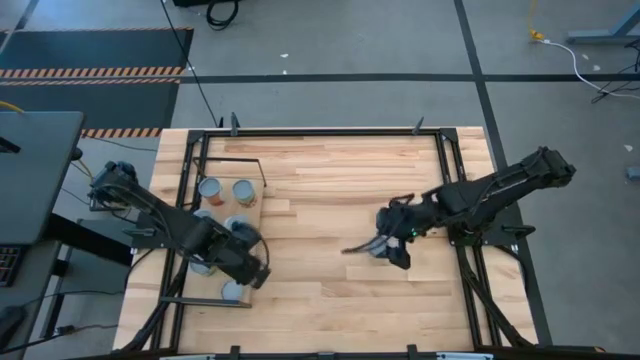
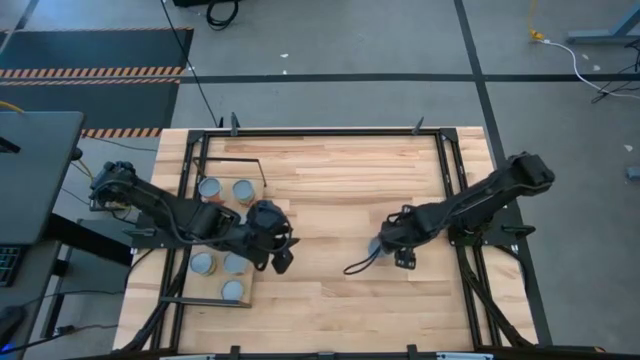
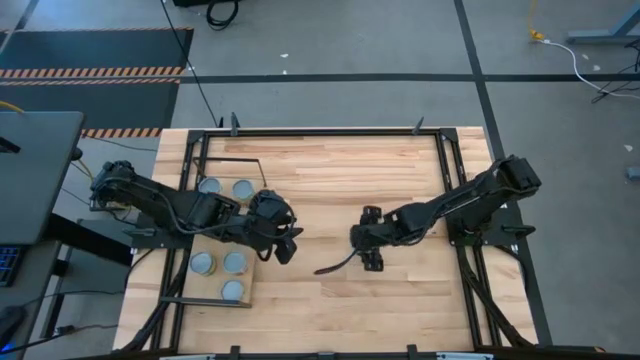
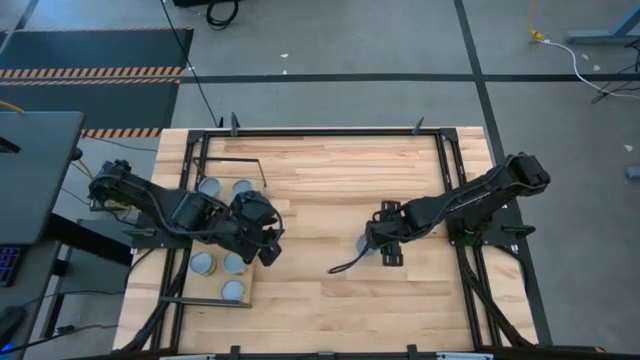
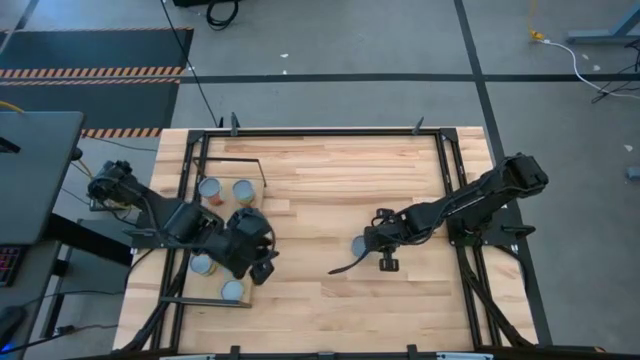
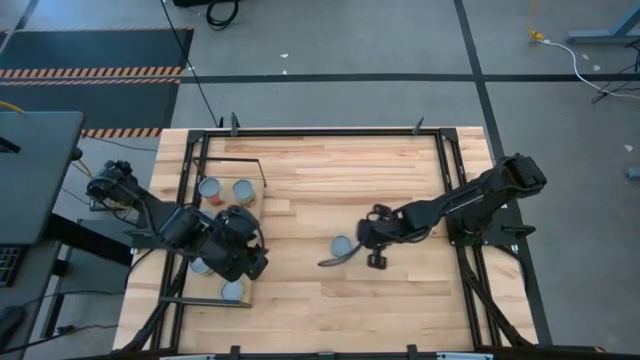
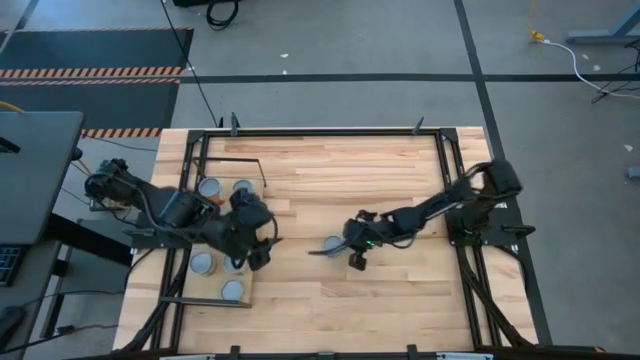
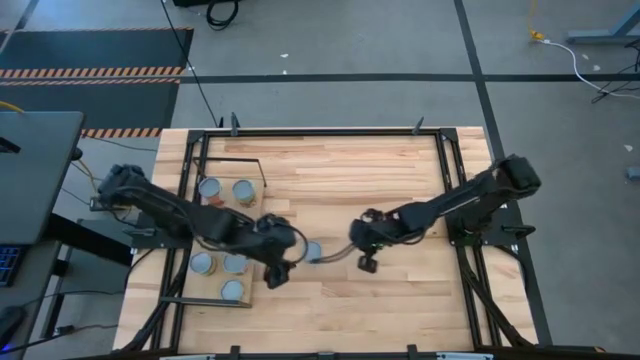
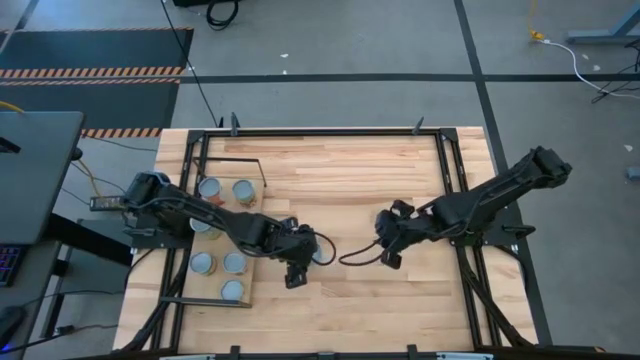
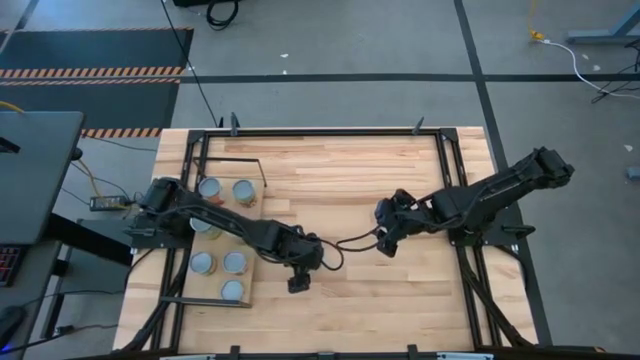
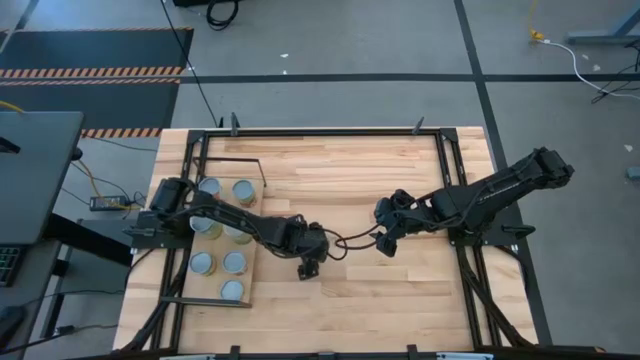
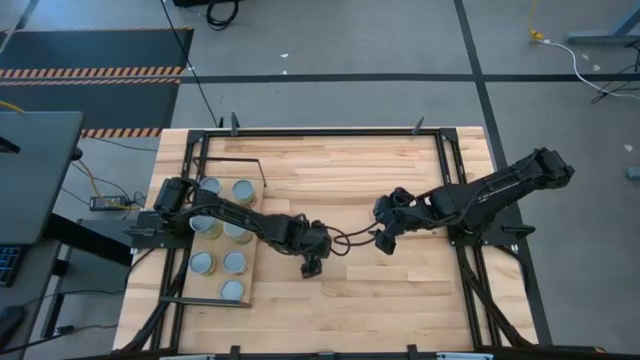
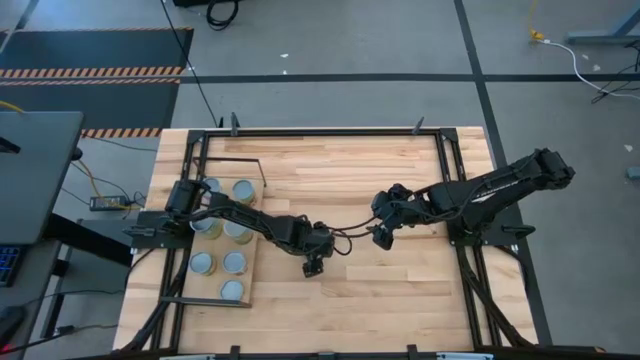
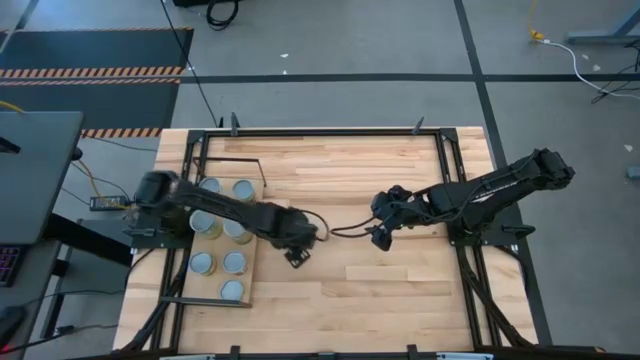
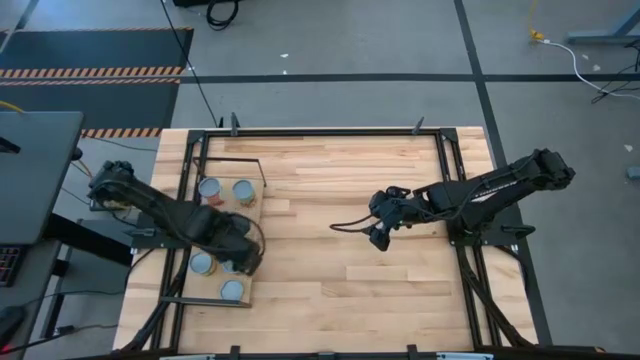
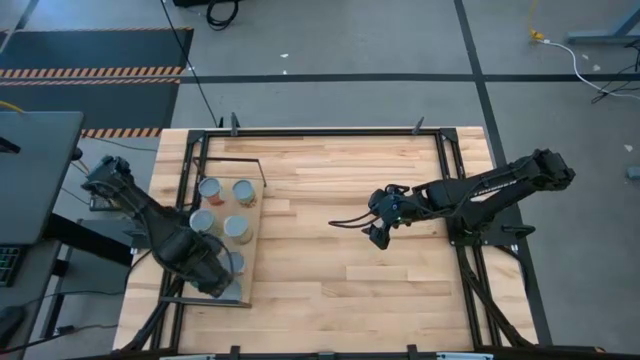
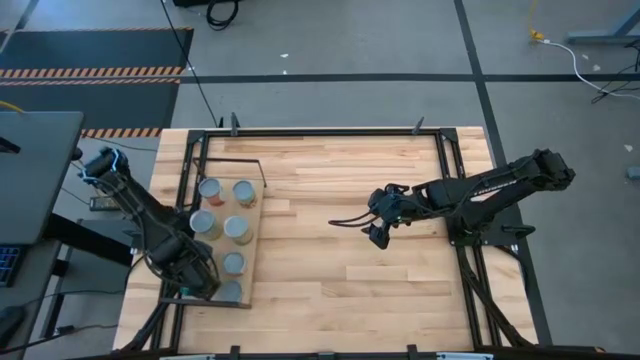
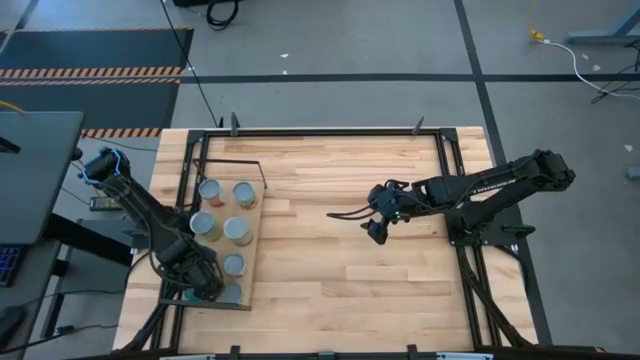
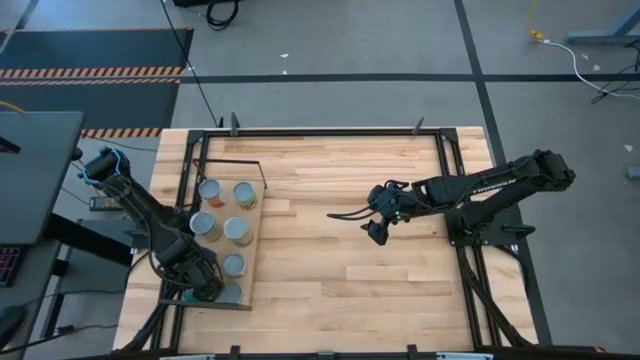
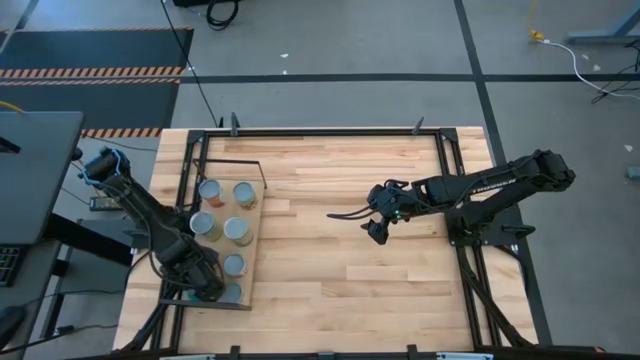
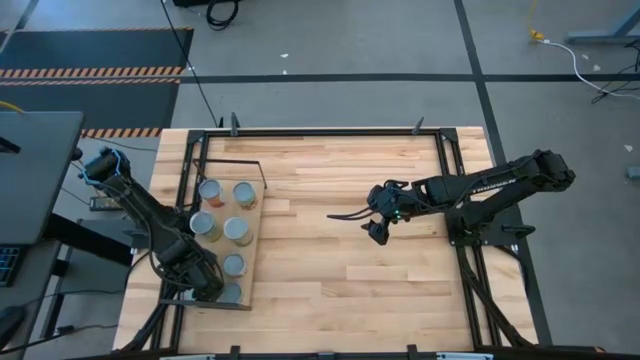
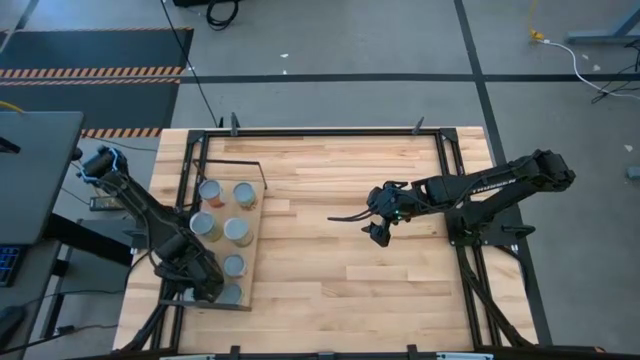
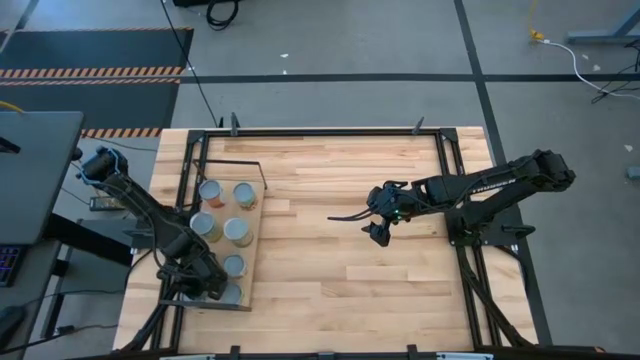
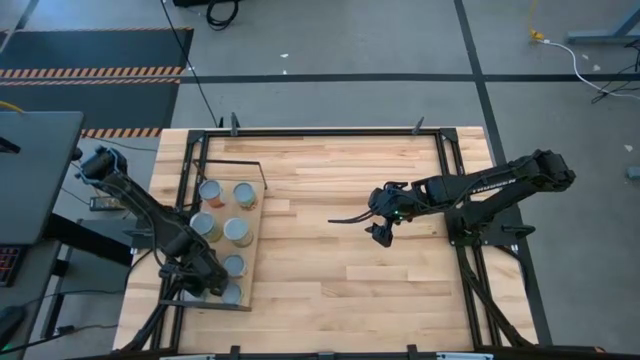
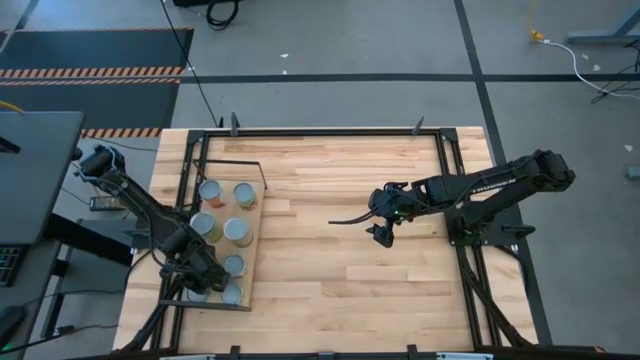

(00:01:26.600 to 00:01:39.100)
Task: Pick and place cans onto a shelf
Put the canned tuna on the shelf

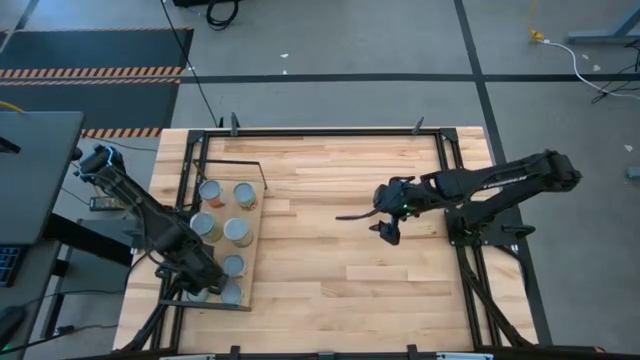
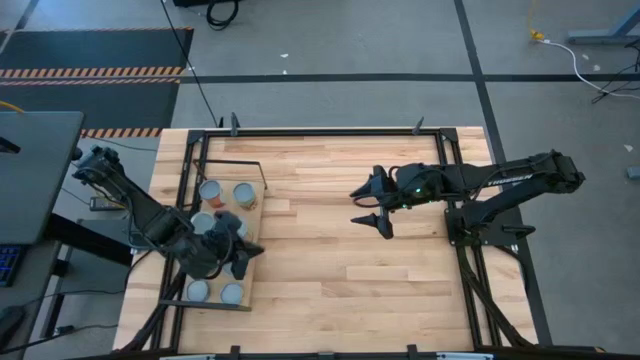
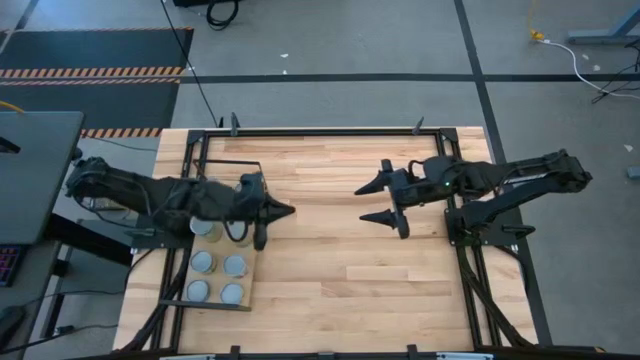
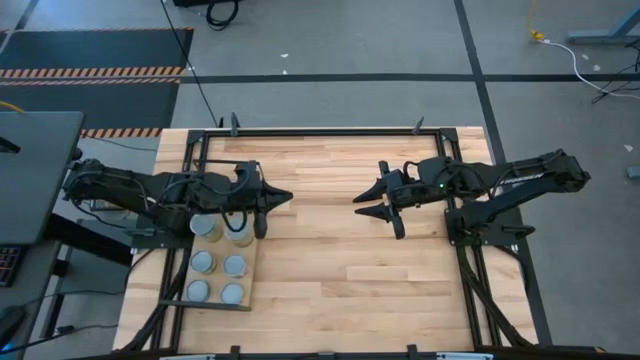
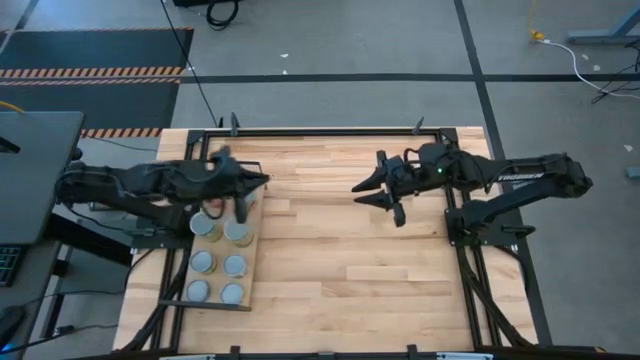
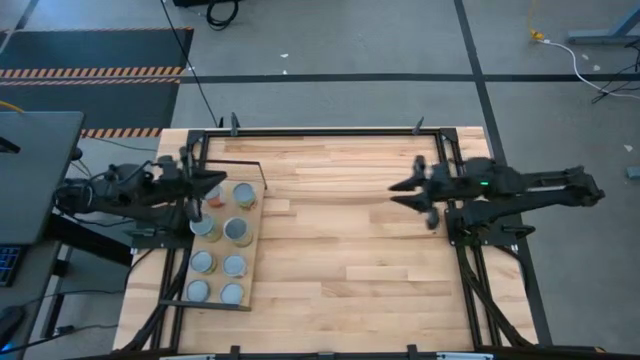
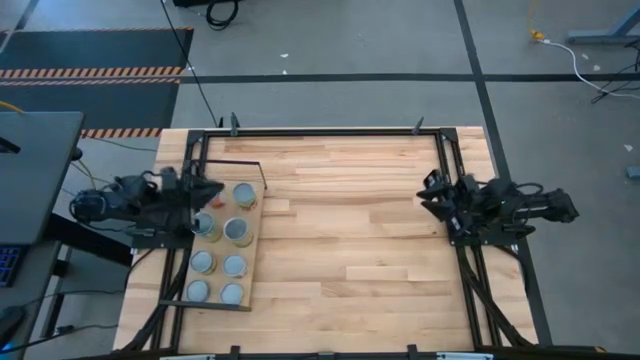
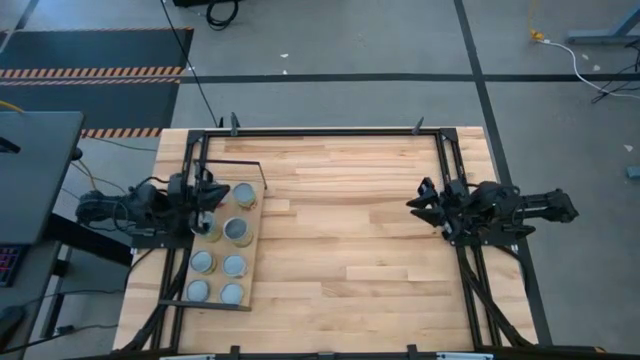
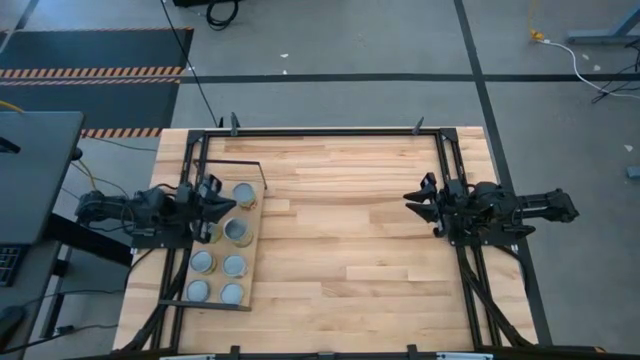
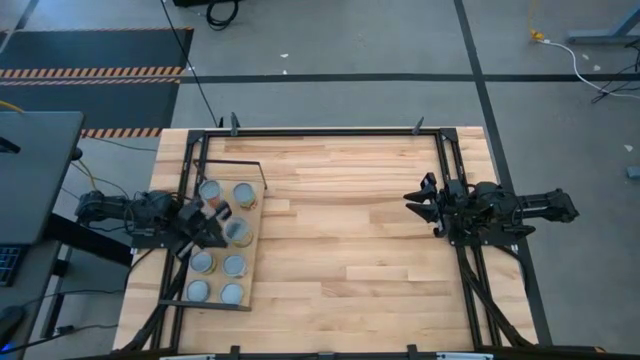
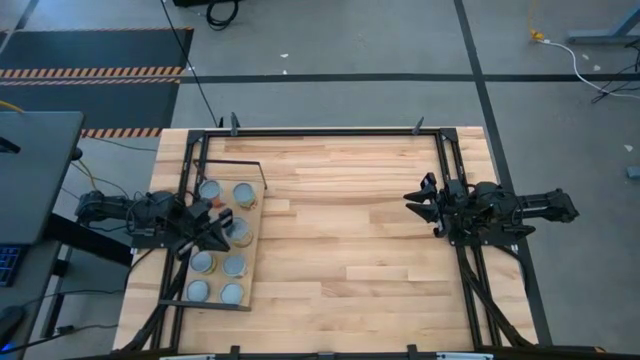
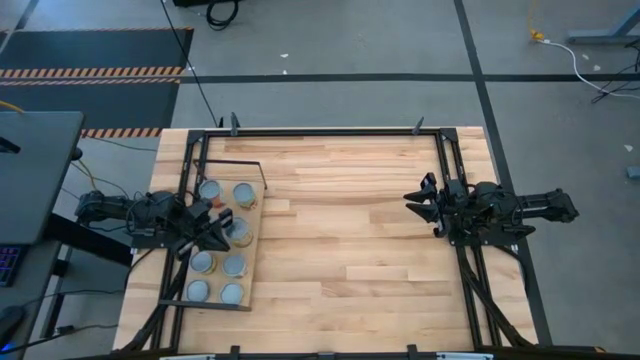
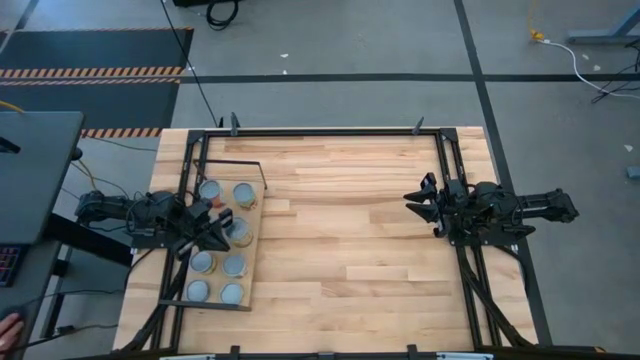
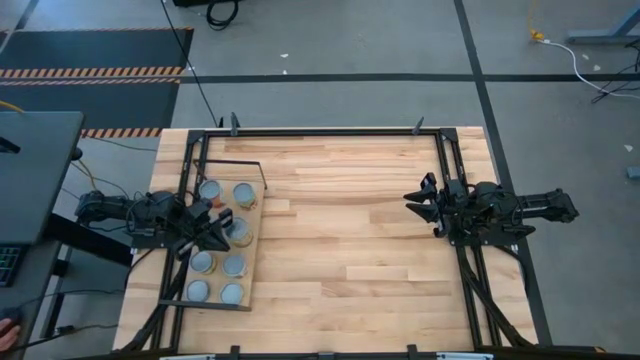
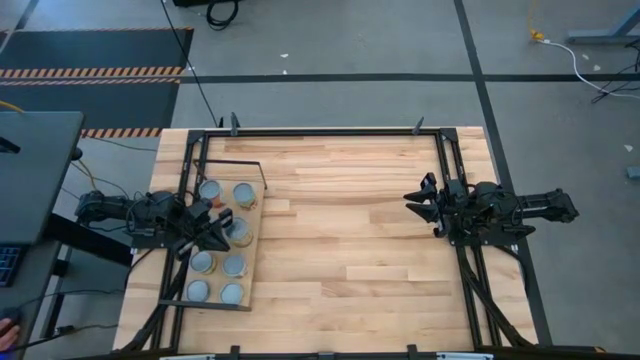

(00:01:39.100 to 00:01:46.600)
Return to Home Position

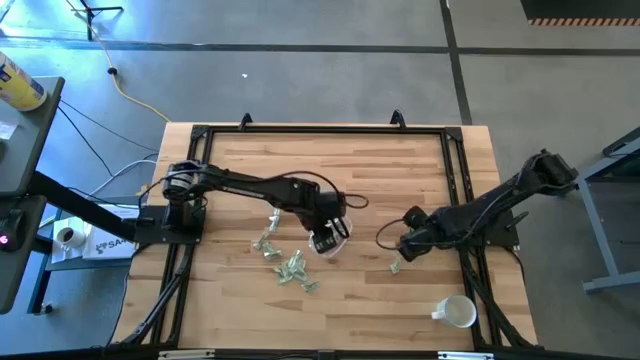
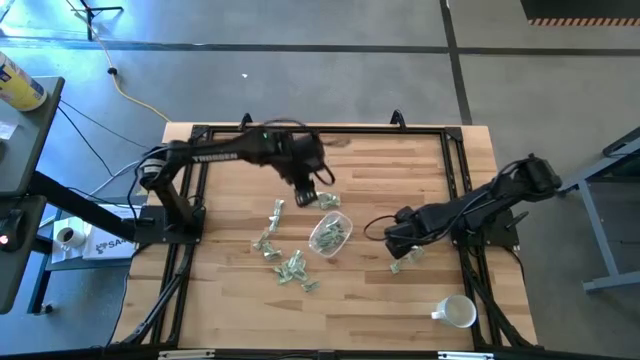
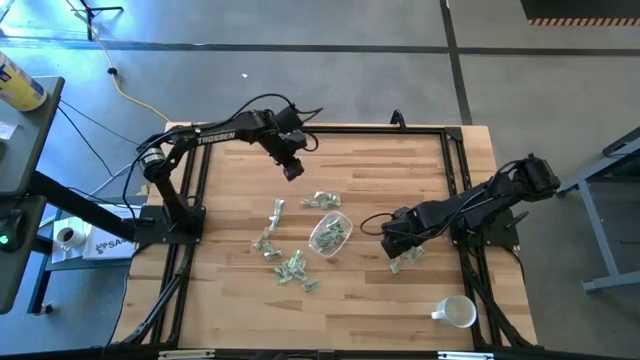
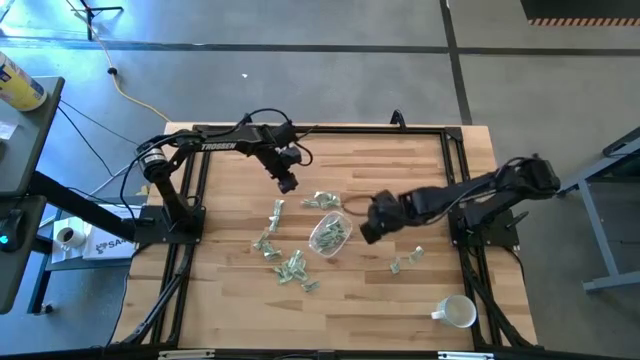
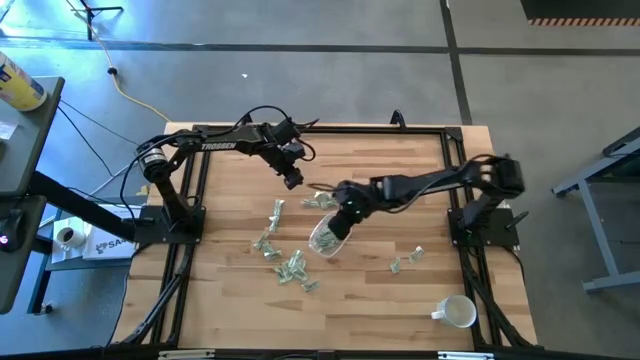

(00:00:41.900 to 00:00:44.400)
Task: Pick and place Stevia / Truvia into bins
Put the stevia packet into the transparent bin
